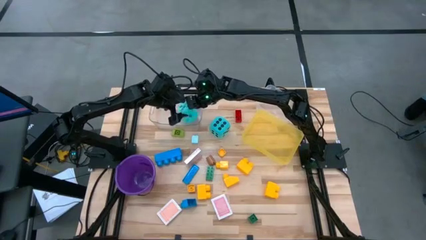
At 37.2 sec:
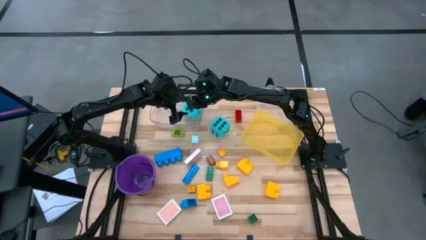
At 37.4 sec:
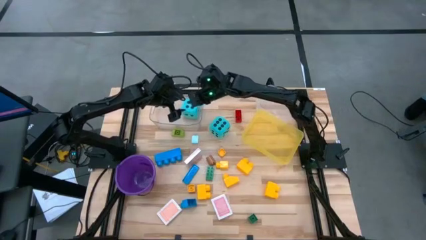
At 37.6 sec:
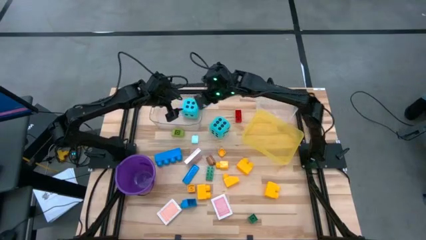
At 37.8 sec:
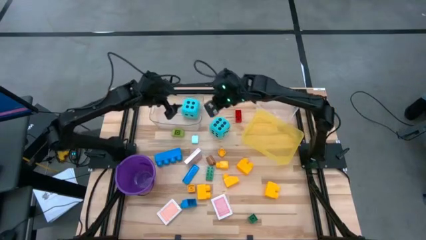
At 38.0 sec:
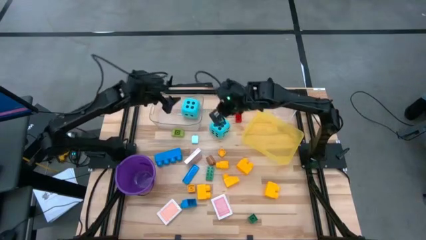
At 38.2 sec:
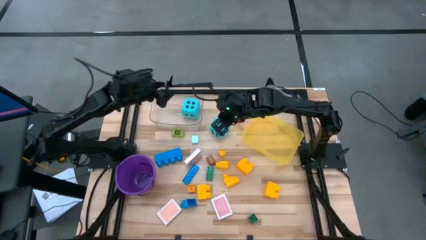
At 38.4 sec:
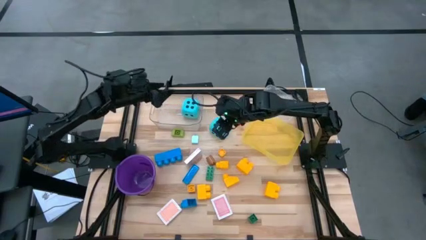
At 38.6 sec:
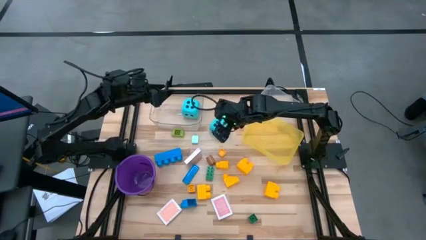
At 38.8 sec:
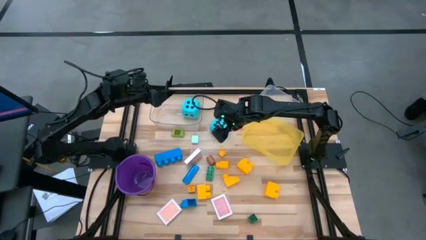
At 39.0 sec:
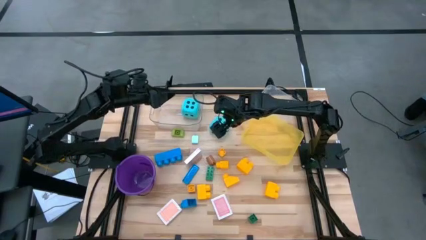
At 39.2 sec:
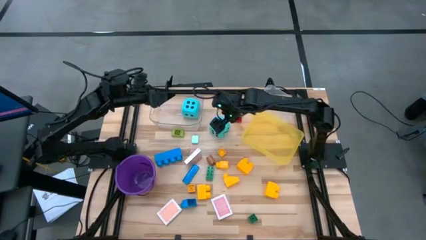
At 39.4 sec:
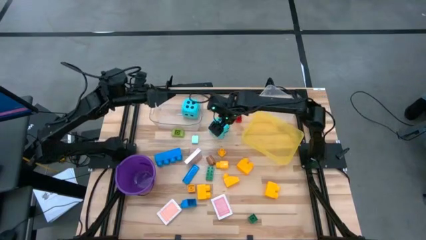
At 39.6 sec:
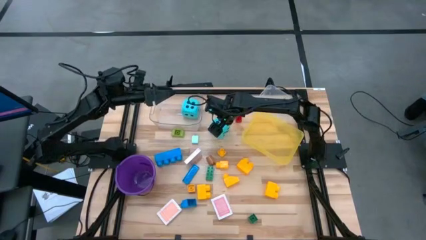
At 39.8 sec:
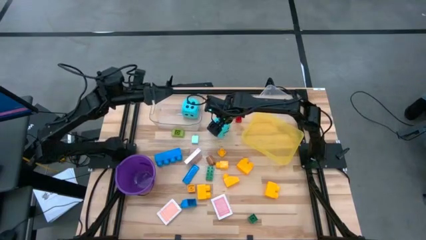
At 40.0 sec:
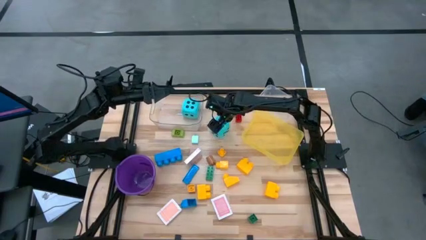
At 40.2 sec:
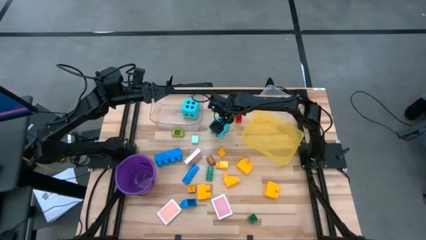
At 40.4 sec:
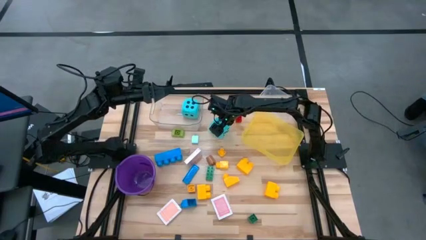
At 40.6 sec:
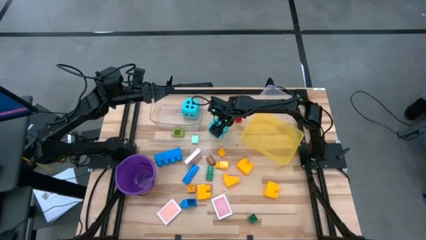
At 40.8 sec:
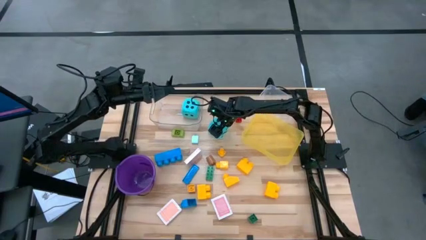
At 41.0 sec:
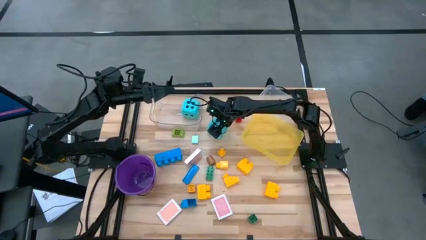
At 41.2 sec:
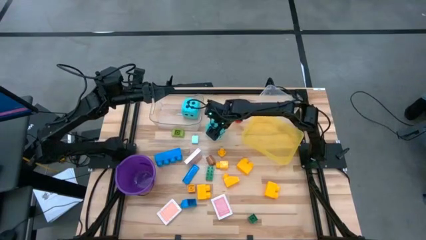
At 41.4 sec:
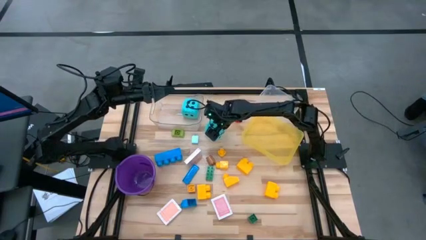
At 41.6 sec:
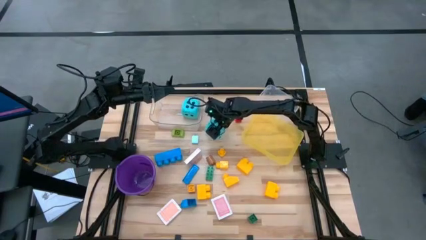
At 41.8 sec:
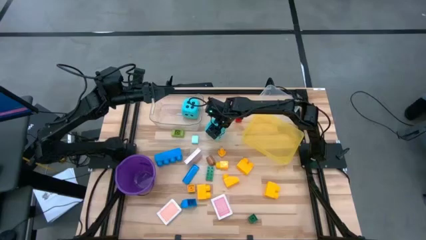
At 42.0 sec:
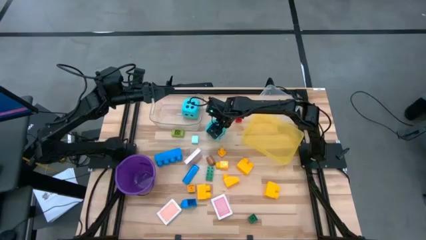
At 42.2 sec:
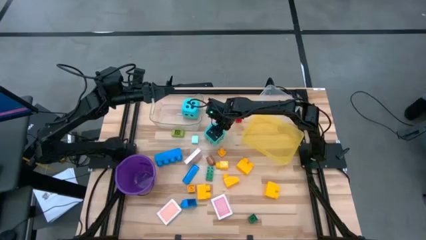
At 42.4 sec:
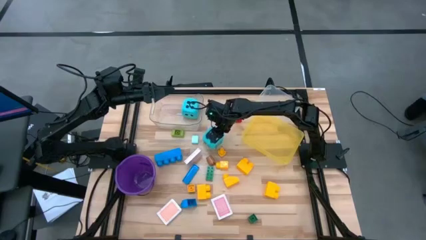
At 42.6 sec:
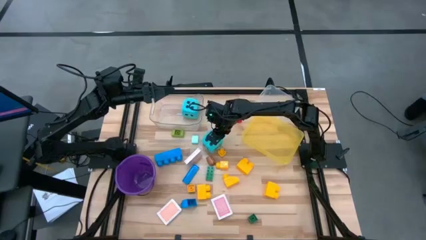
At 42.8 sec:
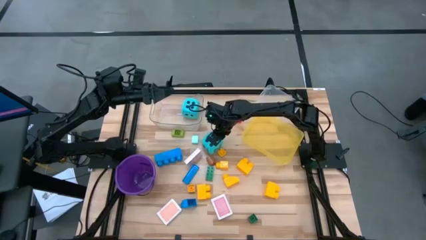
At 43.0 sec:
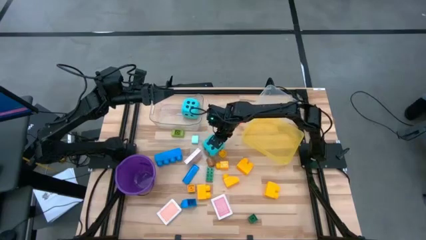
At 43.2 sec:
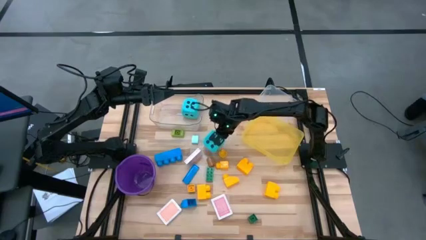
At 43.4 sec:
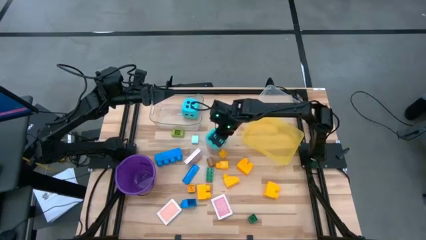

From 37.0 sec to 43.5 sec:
Task: Pick & Place Toys
Put the blue dice into the transparent bin

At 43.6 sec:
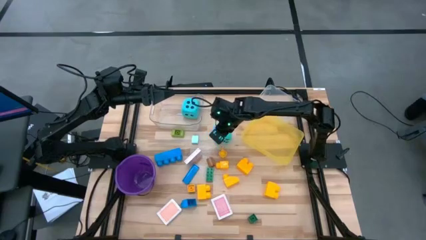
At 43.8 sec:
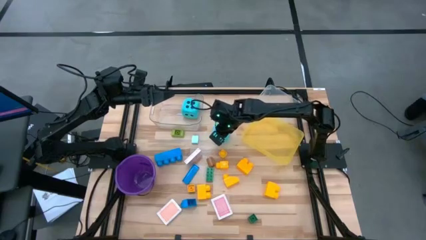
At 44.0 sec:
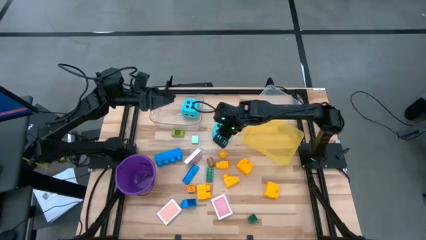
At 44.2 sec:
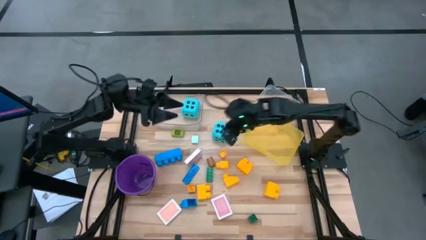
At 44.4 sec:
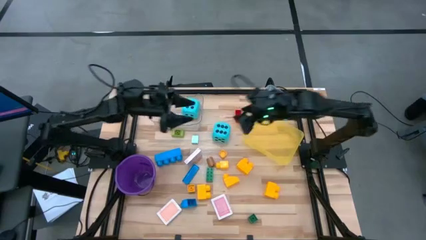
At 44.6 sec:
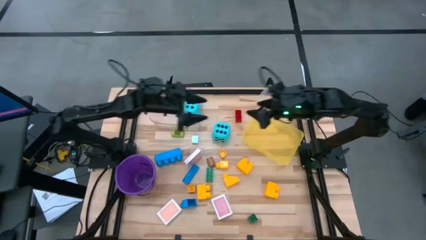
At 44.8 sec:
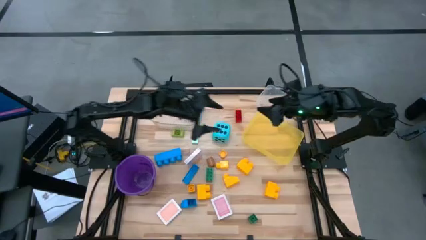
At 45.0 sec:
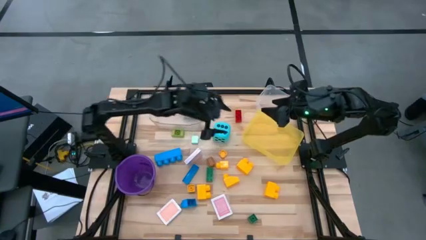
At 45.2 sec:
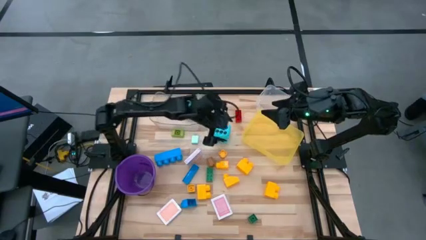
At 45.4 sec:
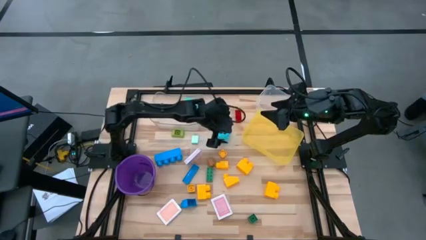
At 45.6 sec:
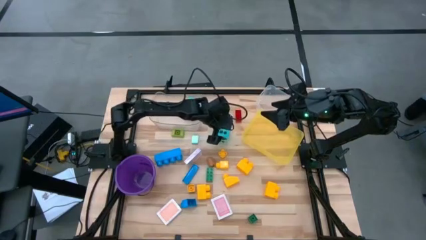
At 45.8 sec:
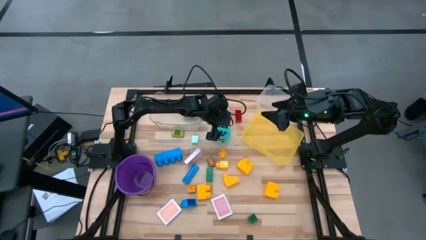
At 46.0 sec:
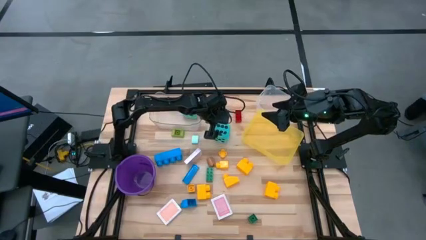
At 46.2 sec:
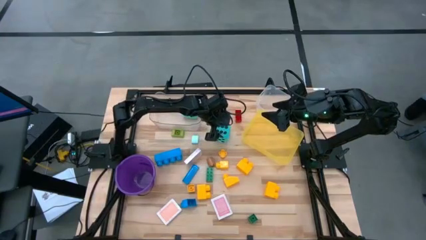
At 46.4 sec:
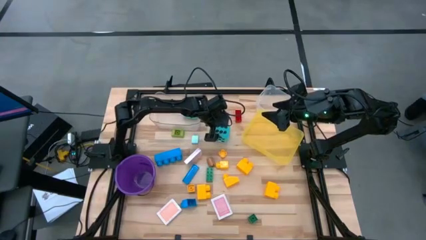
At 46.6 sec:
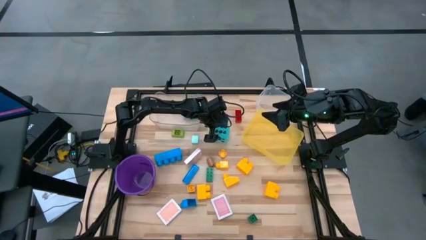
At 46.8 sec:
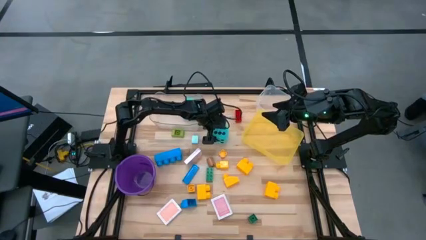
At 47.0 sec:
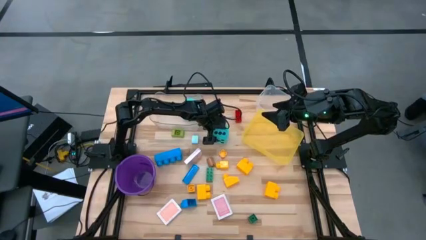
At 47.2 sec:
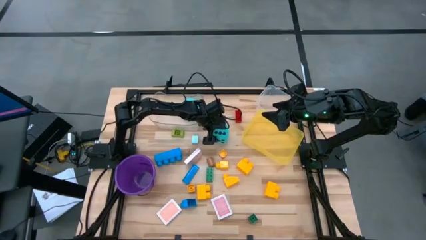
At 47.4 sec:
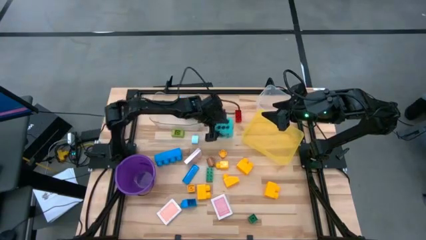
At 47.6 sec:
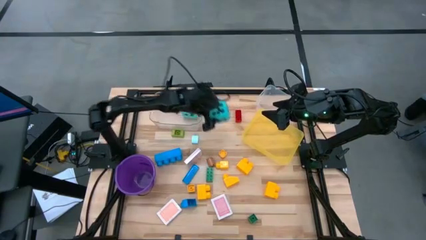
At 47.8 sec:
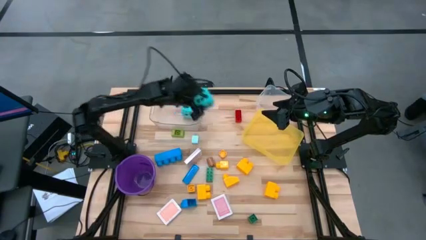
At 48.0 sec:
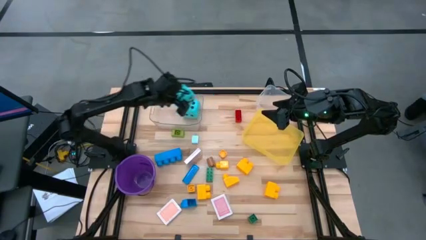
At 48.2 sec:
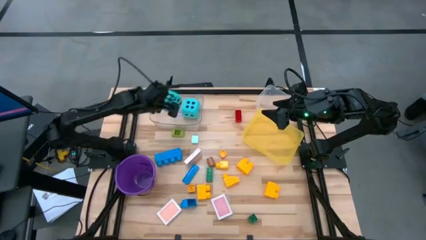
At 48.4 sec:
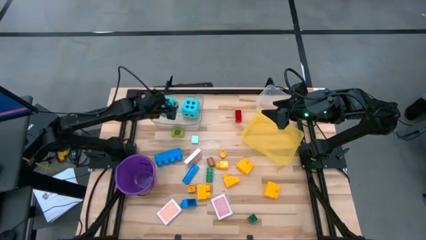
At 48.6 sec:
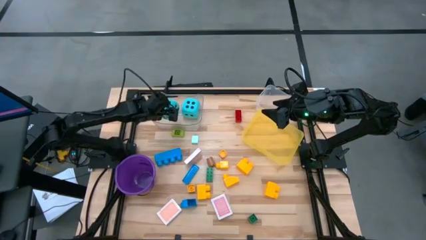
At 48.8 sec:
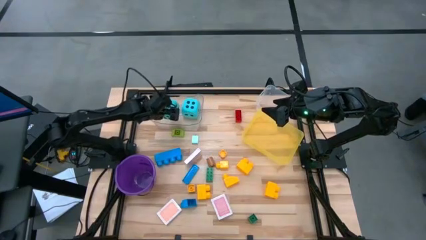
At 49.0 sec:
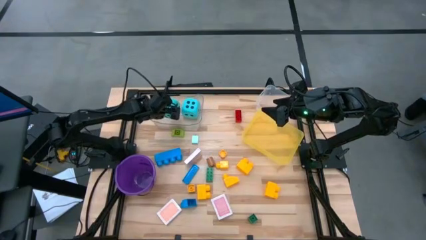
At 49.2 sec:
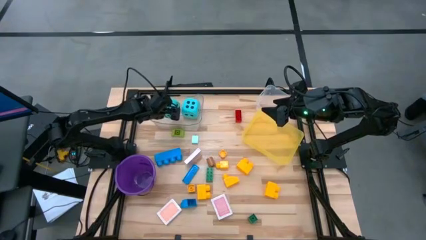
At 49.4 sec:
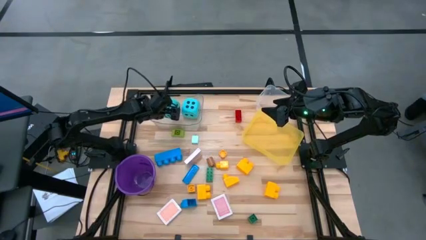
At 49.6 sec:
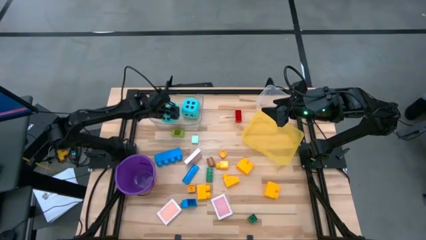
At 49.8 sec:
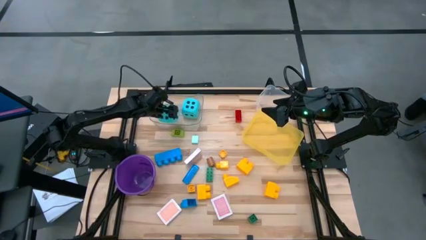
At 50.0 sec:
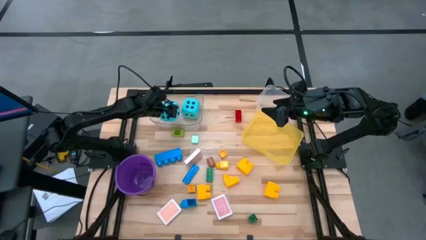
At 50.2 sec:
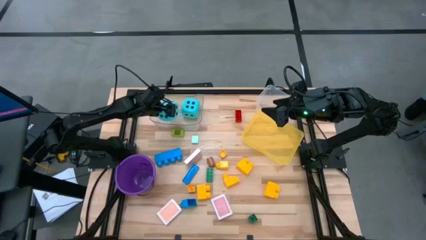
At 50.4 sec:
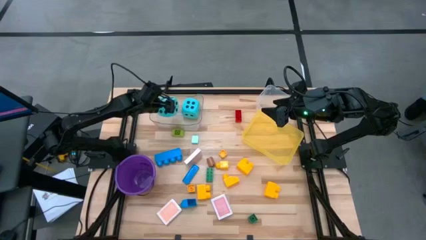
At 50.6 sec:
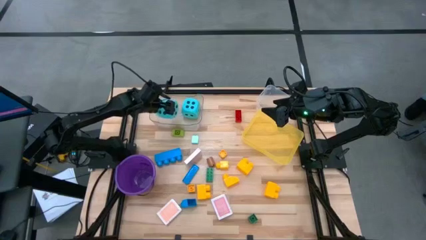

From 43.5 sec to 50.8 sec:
Put the blue dice into the transparent bin
